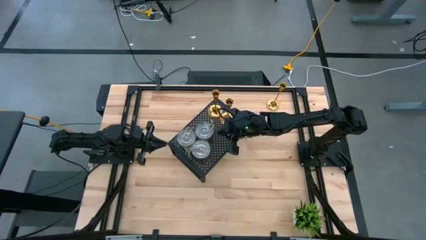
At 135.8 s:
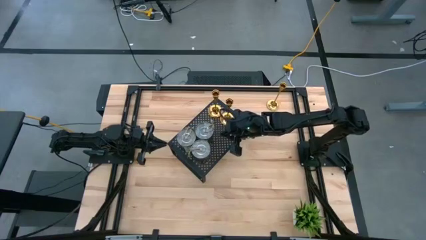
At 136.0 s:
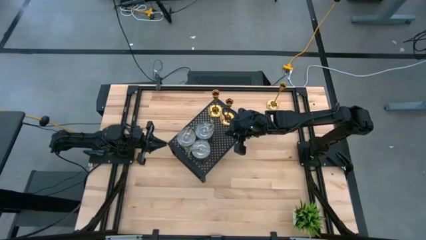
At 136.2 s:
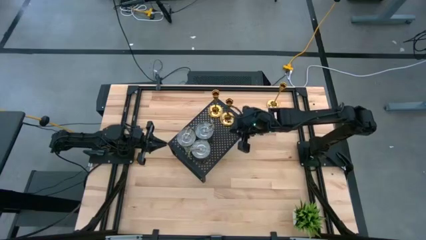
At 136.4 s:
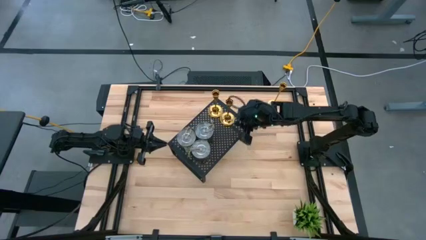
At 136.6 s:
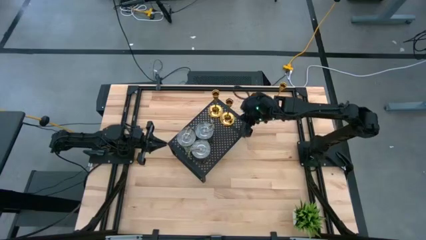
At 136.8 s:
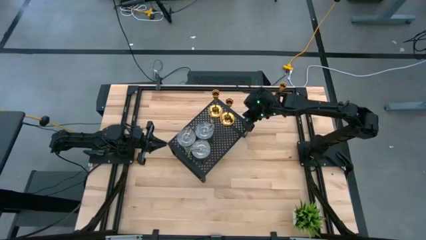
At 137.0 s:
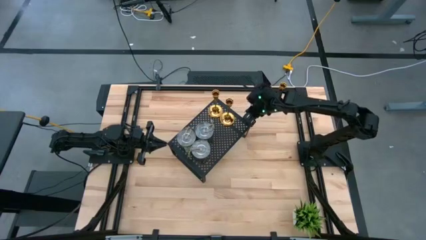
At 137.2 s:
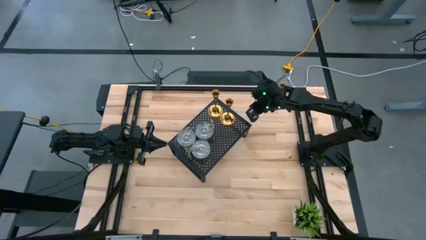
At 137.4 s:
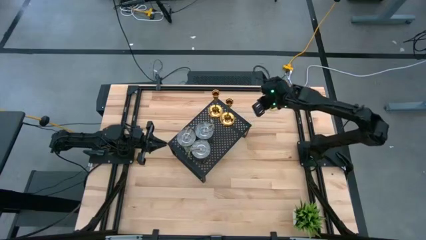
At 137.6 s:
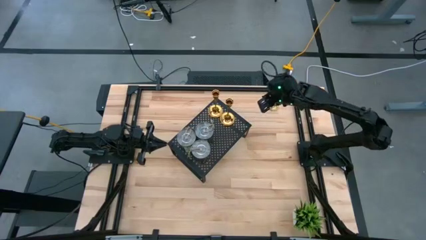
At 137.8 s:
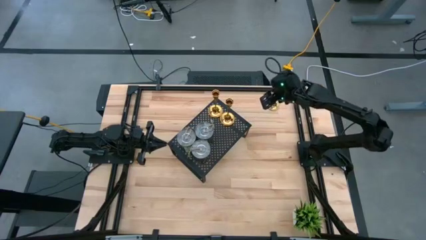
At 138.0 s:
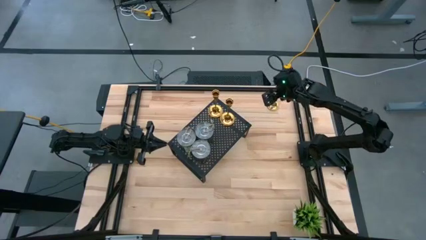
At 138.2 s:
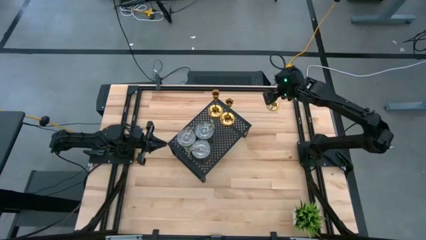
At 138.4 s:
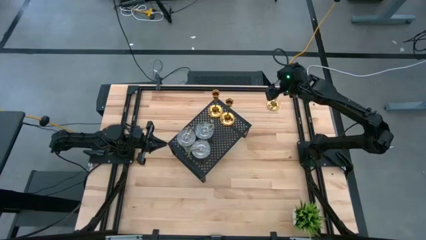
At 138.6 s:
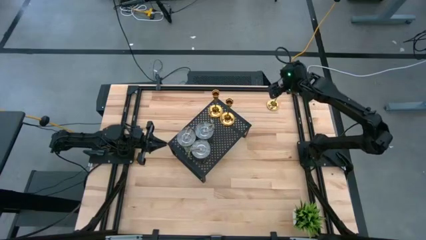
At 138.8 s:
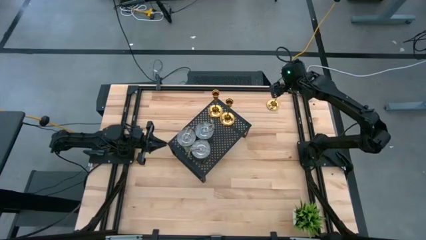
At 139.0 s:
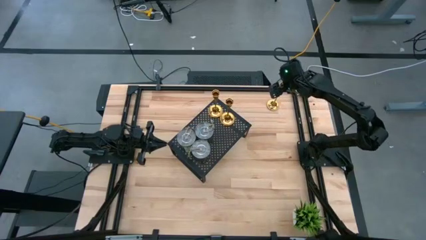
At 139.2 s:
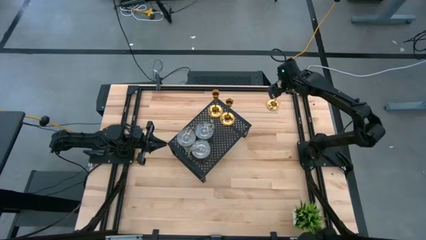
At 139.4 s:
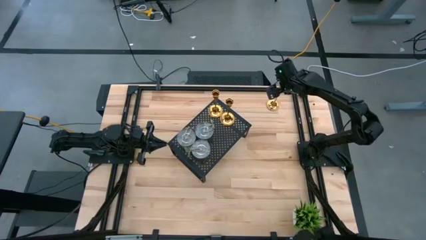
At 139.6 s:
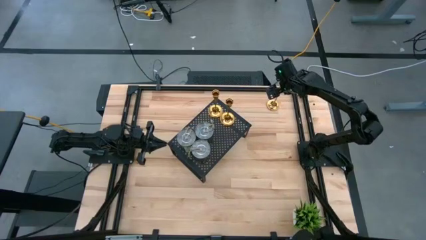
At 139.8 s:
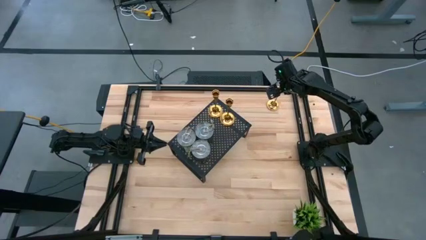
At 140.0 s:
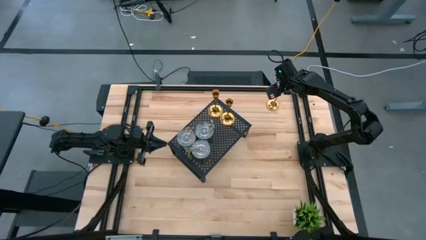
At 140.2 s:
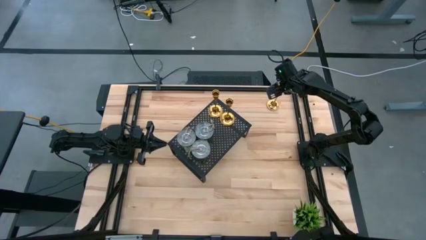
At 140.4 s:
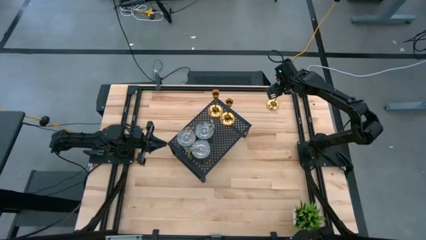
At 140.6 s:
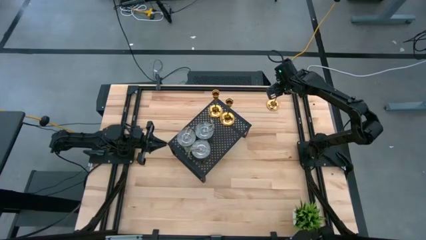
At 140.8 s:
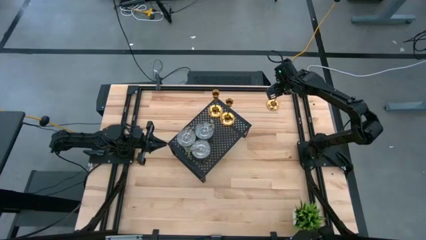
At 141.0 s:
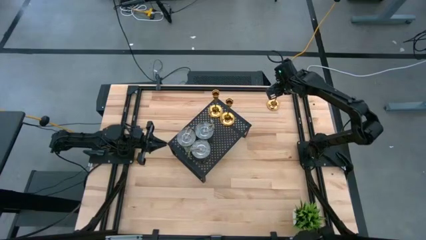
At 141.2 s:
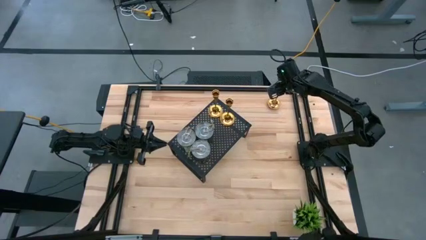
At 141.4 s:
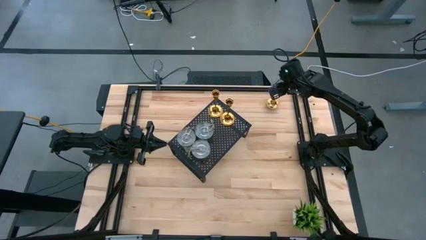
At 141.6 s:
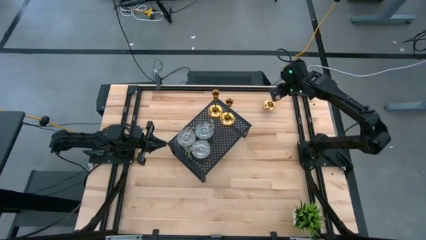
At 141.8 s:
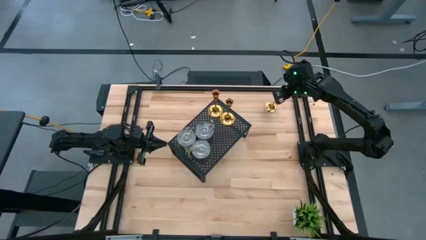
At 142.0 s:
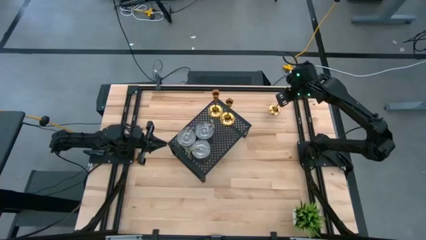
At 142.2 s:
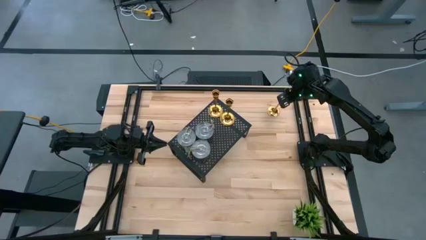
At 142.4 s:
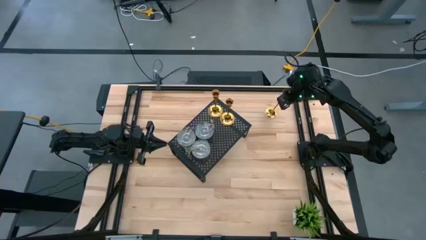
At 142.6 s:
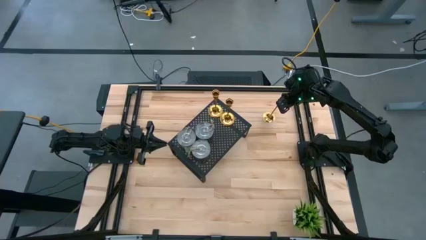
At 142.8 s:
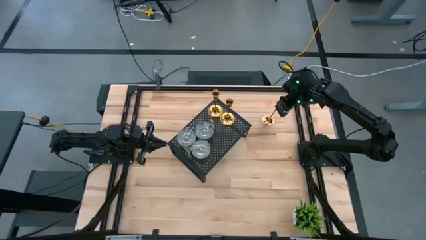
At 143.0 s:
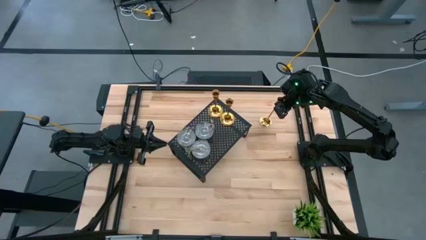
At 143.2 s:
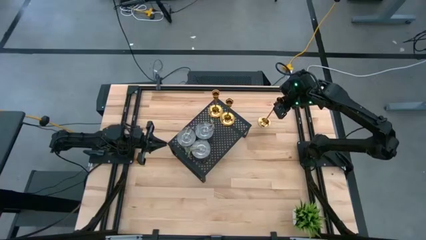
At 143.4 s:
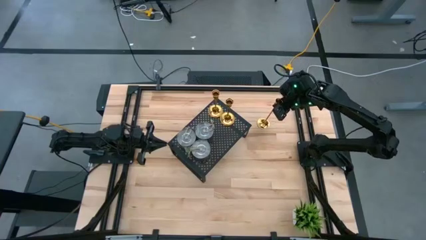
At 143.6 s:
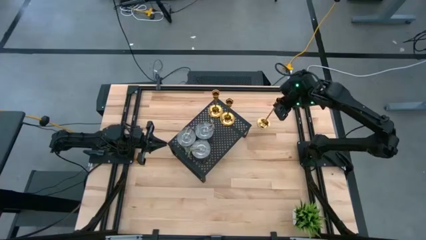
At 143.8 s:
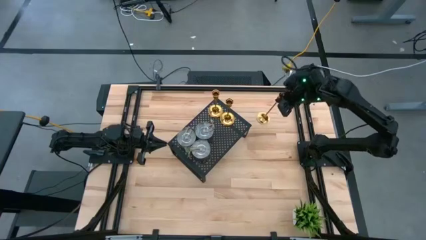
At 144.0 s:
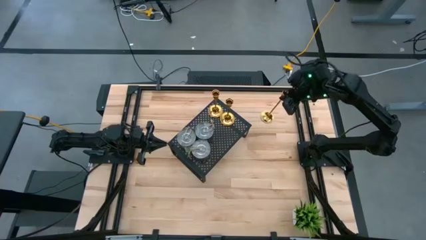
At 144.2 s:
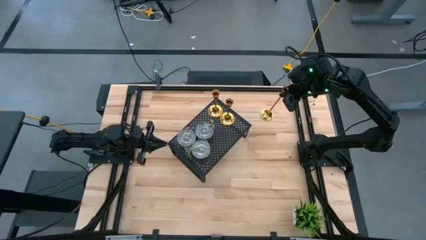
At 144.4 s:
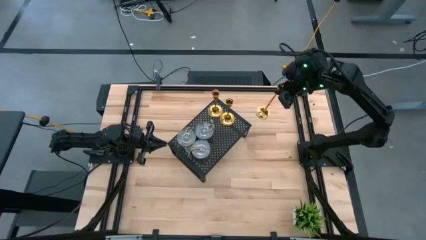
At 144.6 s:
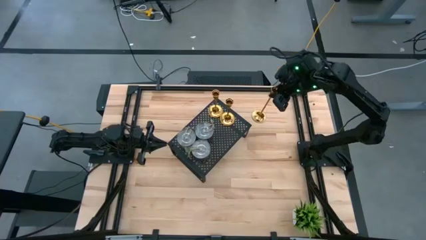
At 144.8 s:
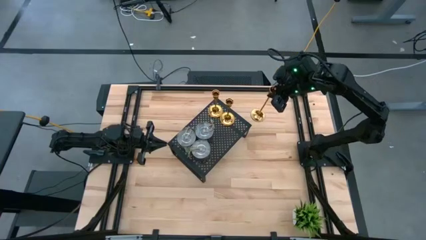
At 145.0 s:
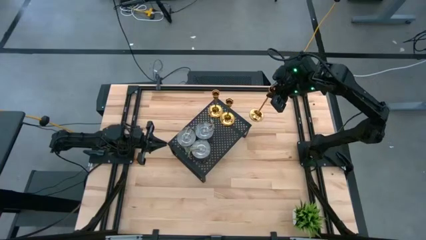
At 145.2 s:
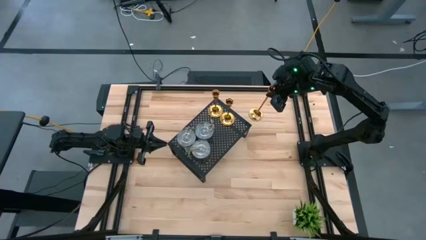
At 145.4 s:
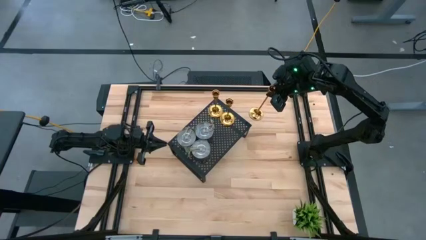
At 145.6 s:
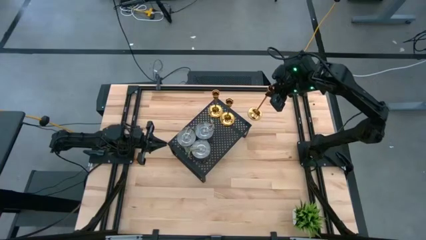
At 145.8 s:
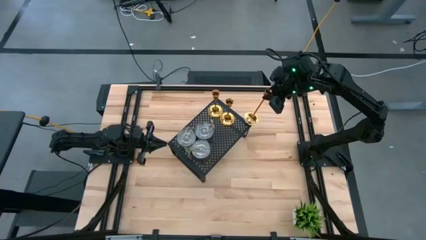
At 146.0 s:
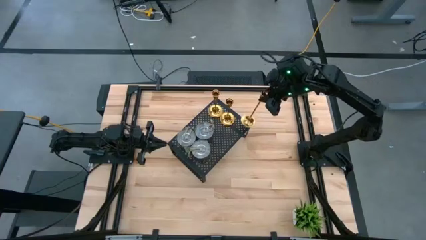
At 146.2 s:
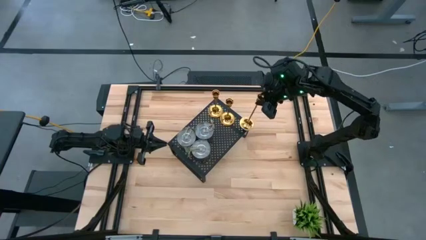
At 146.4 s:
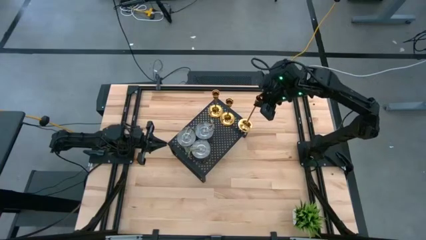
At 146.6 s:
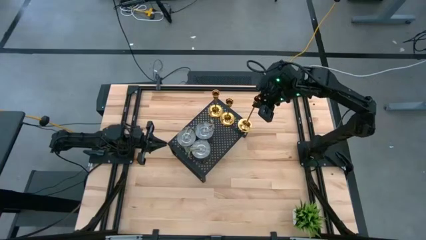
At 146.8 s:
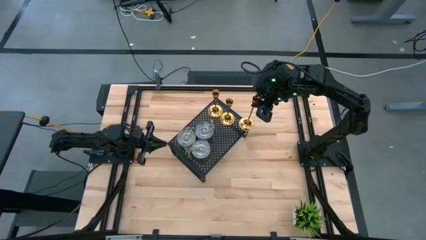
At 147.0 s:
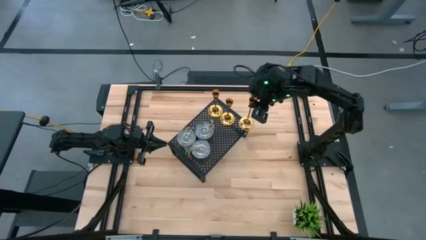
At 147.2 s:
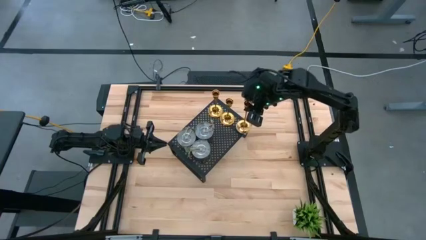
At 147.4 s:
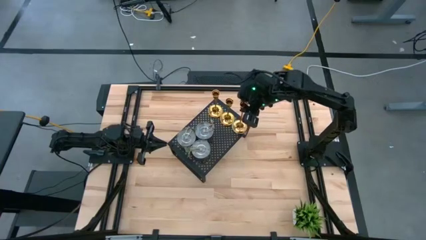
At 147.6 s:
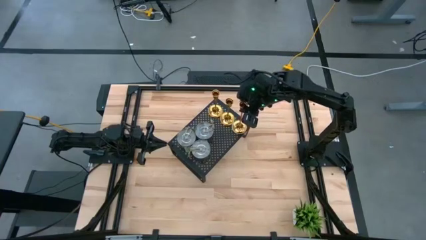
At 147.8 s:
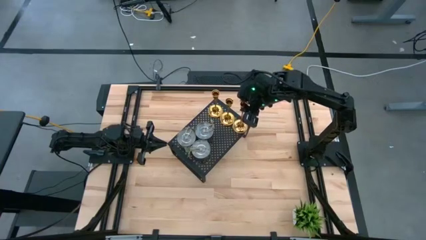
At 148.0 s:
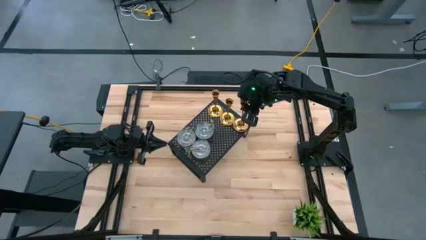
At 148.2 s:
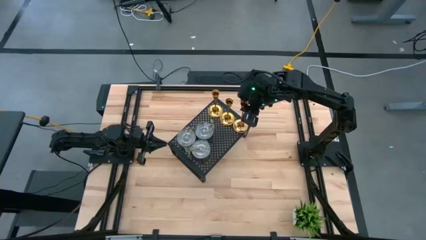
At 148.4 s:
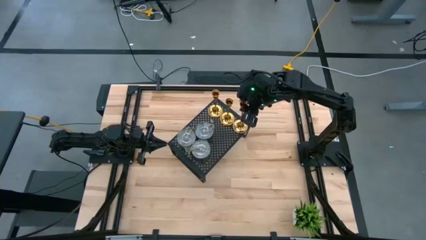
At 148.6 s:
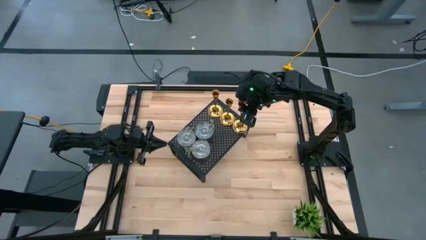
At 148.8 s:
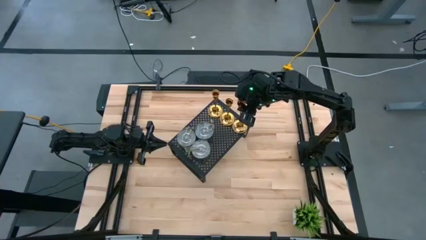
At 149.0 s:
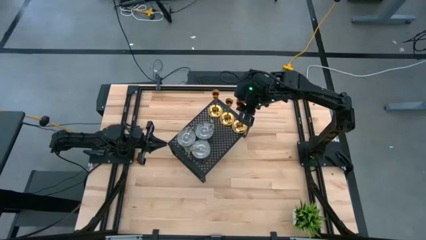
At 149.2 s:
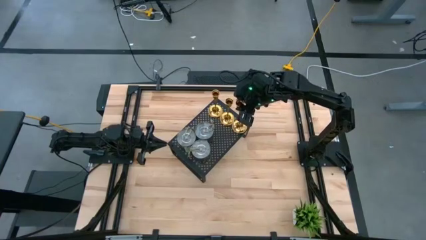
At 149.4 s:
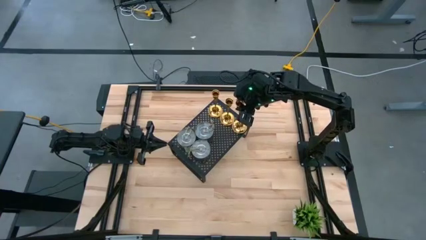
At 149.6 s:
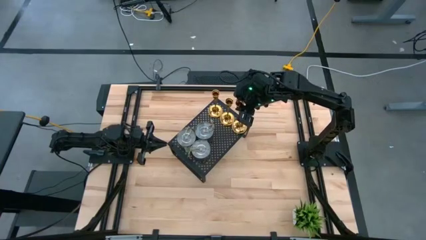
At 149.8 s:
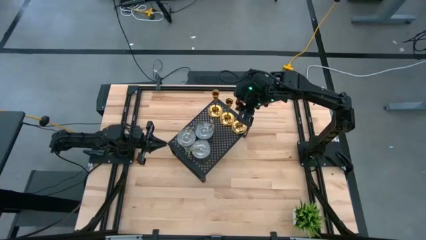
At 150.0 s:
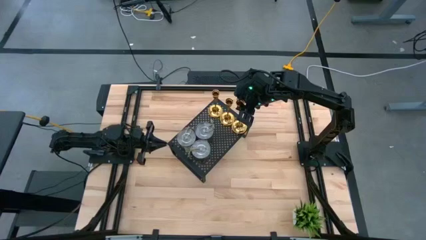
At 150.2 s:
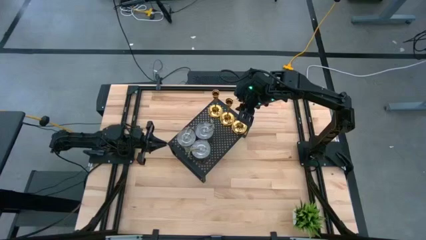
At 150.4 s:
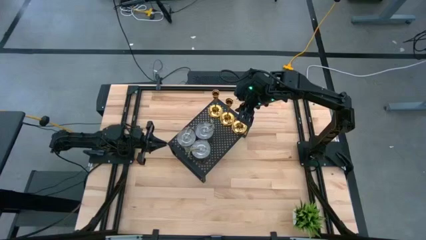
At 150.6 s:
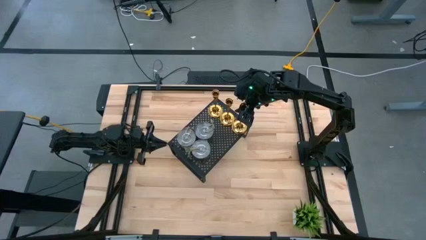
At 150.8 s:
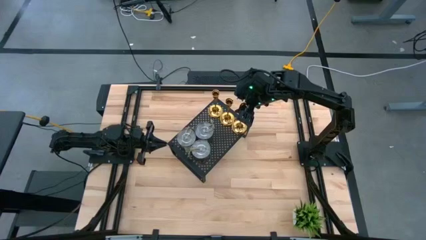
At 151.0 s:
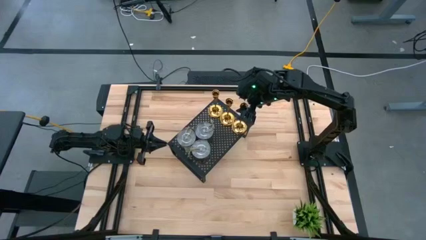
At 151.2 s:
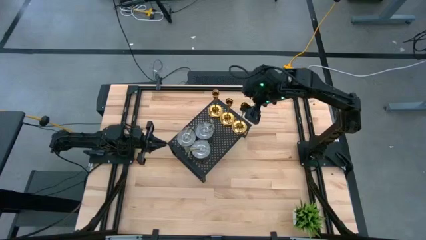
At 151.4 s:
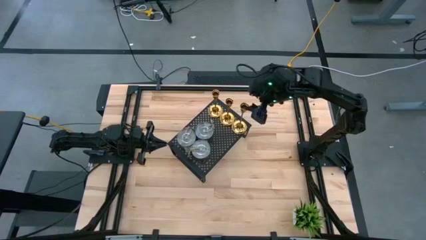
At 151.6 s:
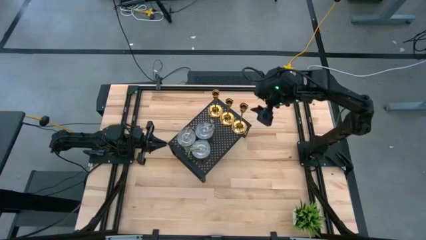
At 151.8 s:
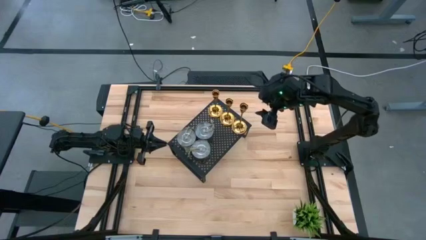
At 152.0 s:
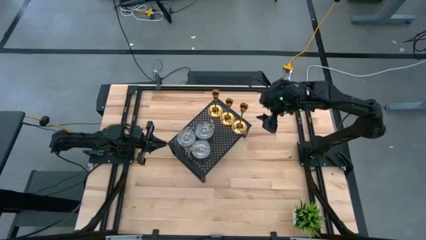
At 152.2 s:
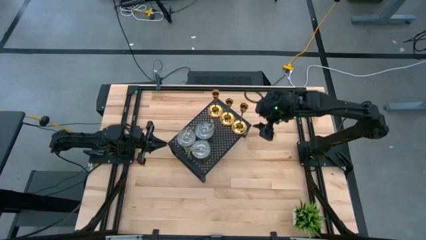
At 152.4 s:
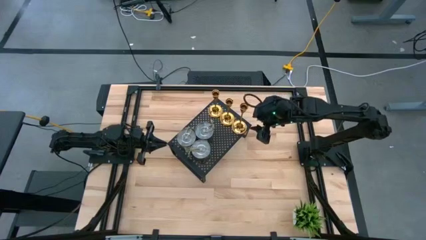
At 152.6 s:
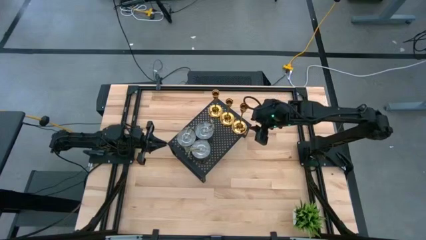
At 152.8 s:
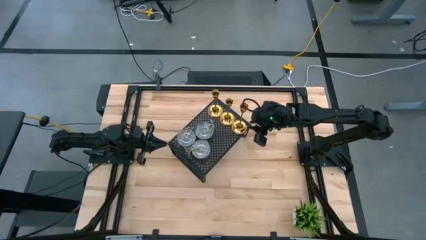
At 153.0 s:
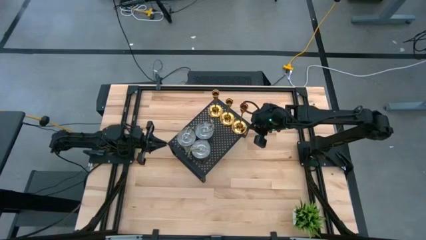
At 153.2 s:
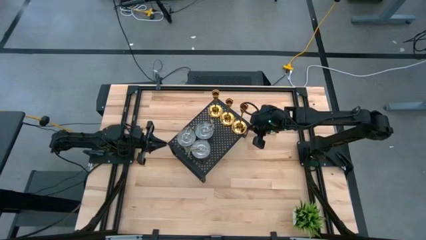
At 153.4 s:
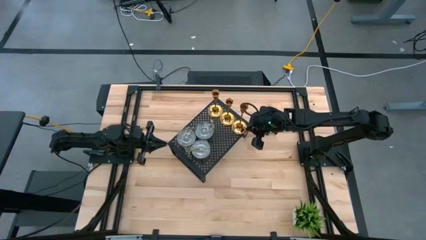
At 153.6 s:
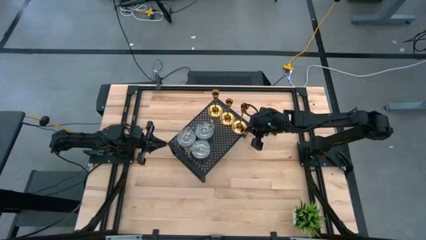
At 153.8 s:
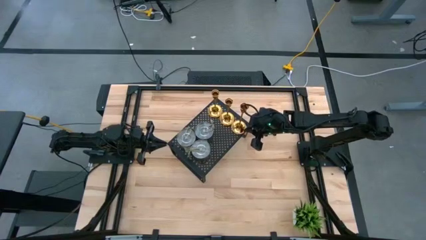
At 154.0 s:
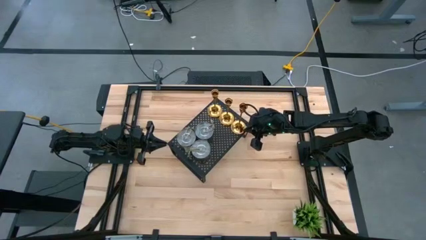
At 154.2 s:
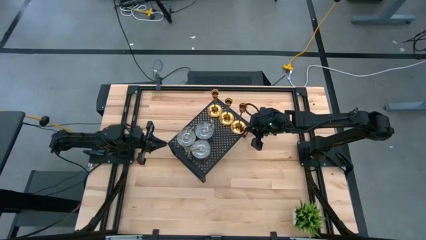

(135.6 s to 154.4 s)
Task: Pick & Place candle stick holders
Put the gold candle holder on the shelf aligned with the other gold candle holder
